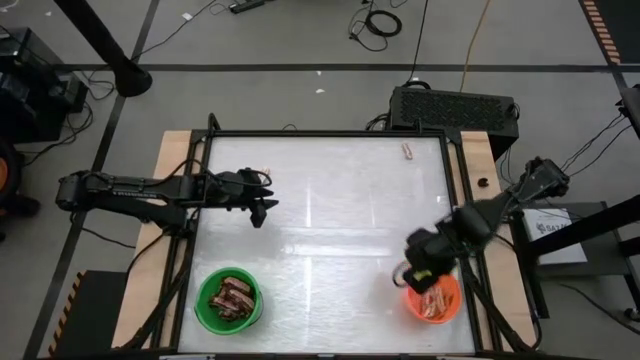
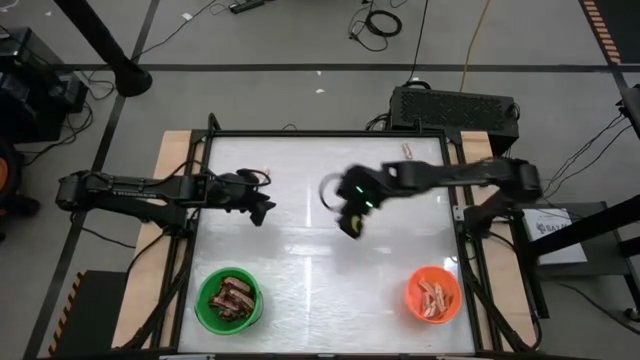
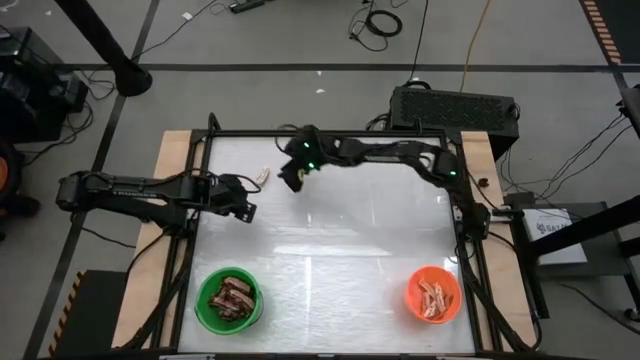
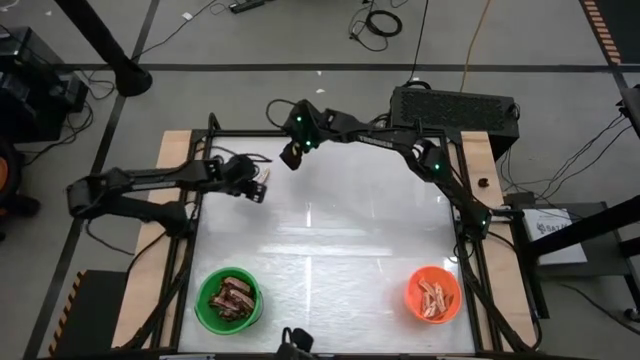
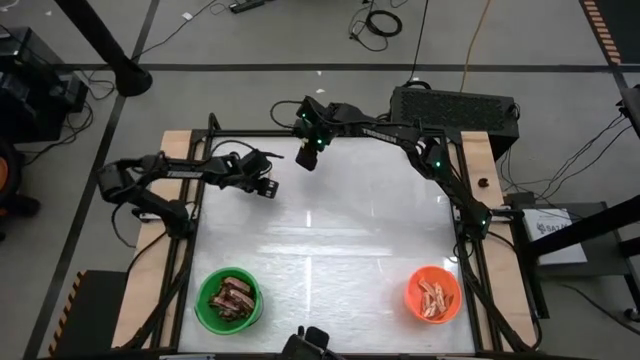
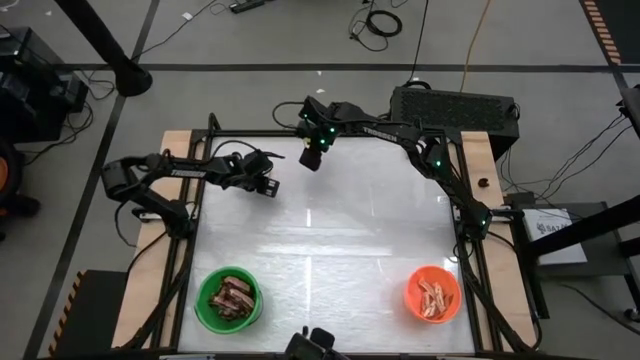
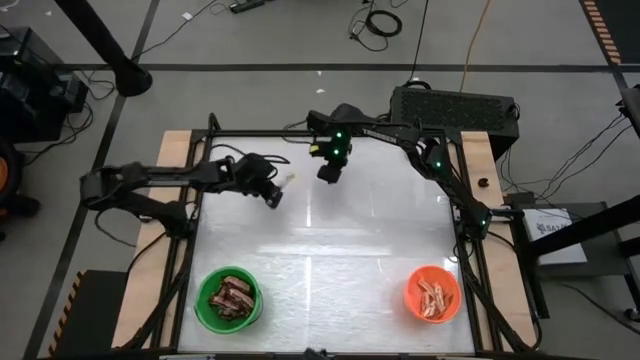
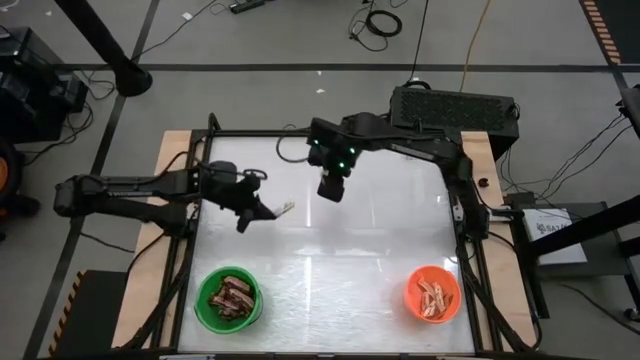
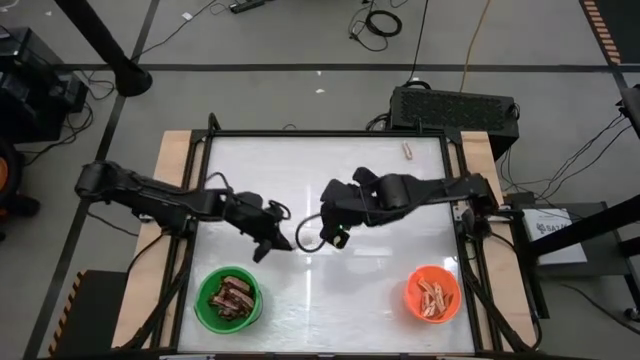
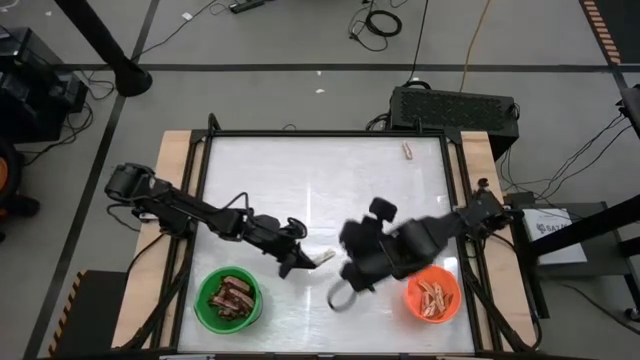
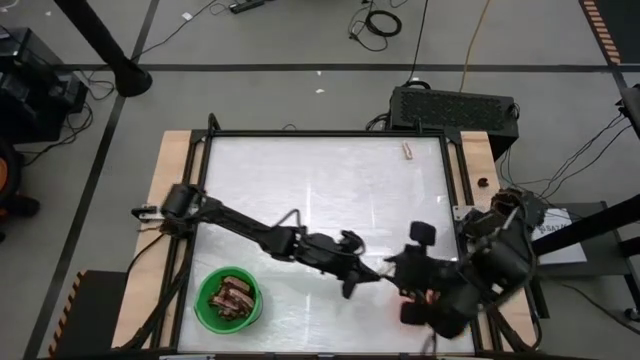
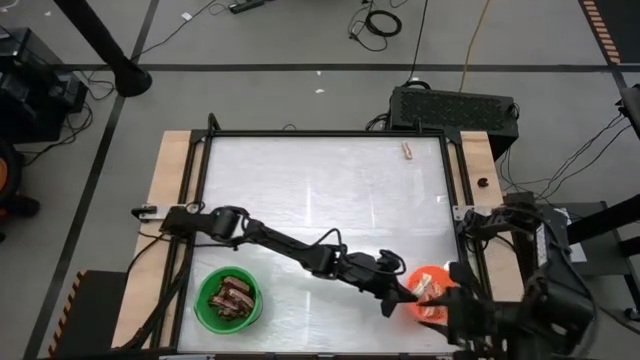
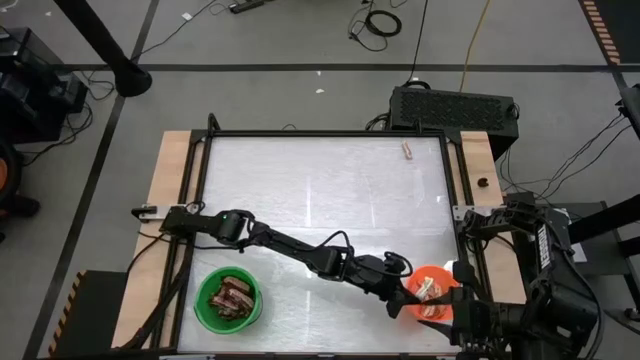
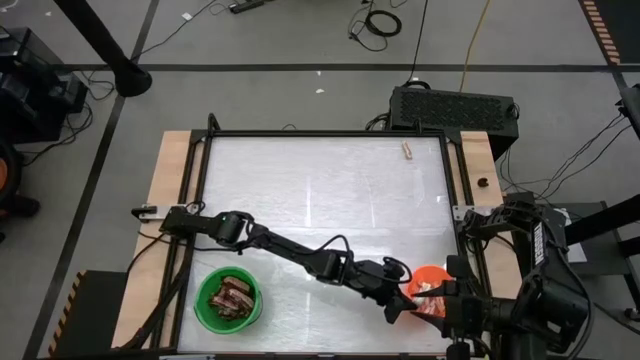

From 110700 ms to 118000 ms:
Task: Sort candy by brand, put in halloween buckets
Put the white candy into the orange bucket

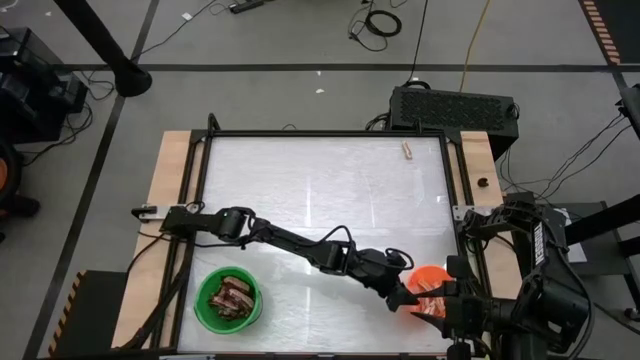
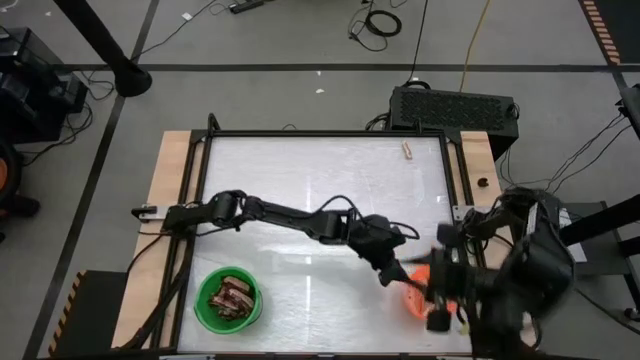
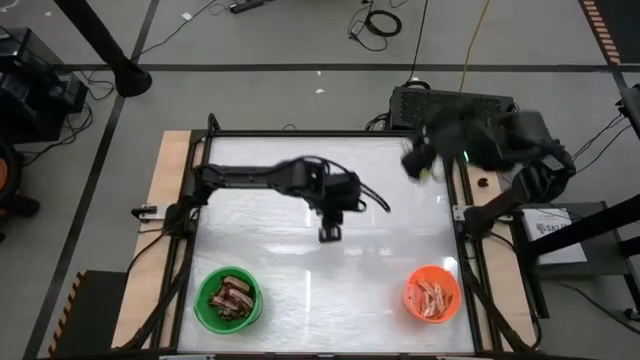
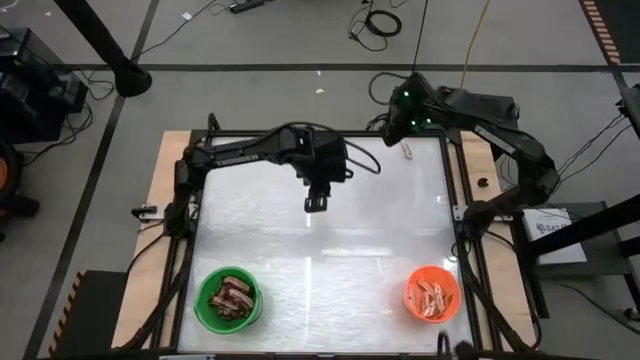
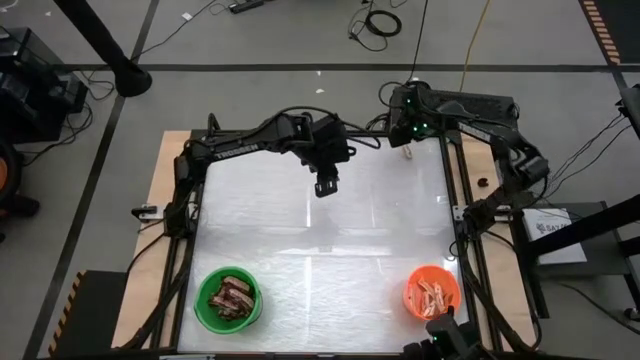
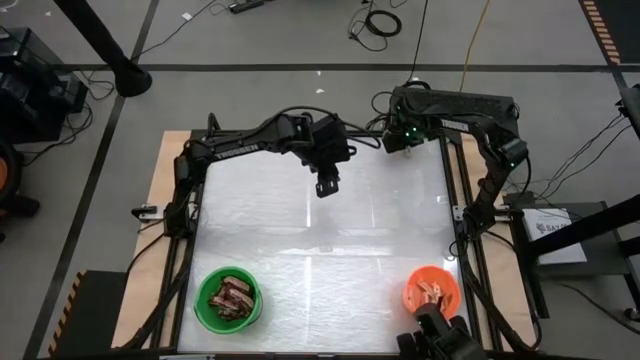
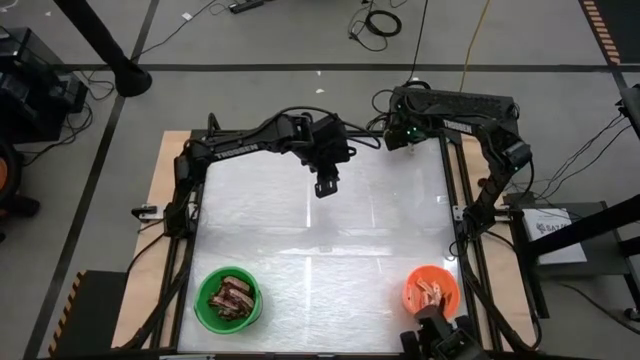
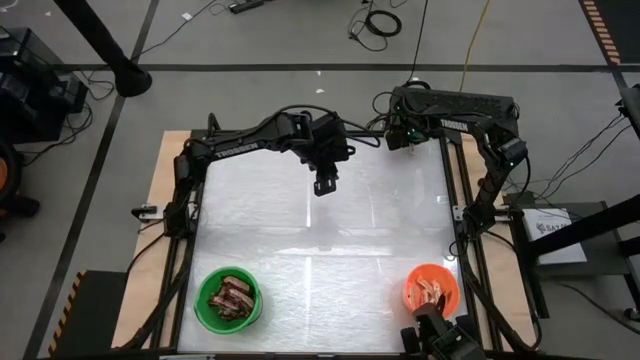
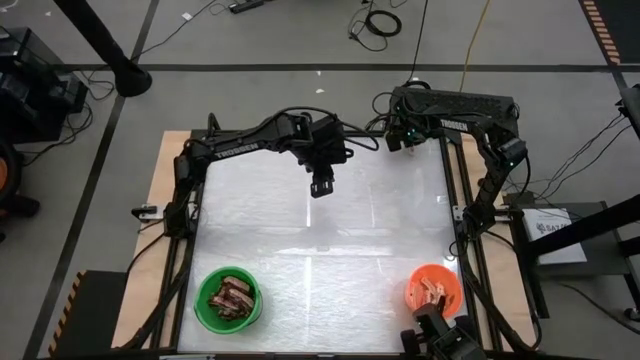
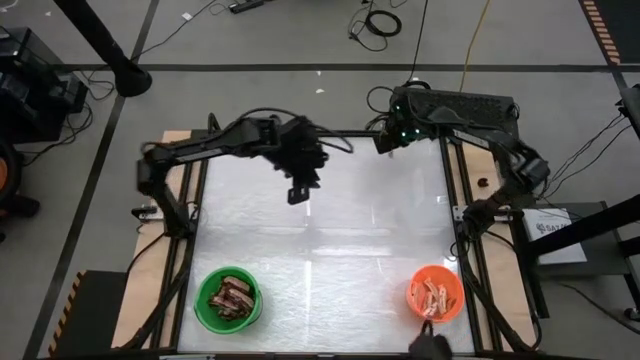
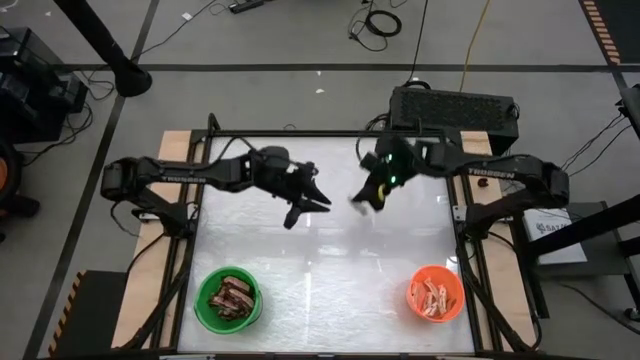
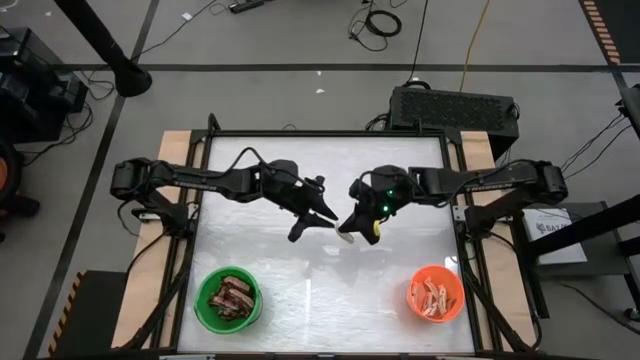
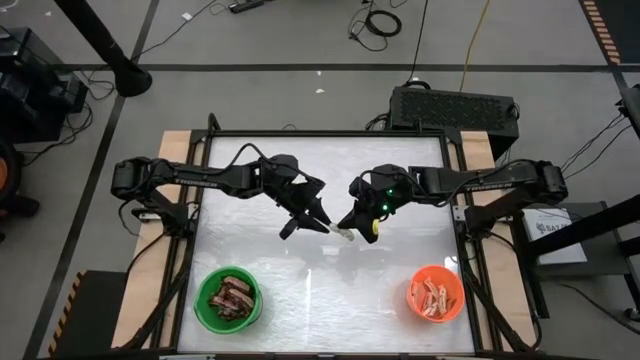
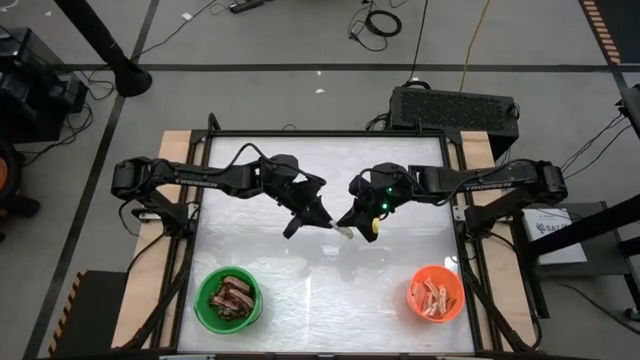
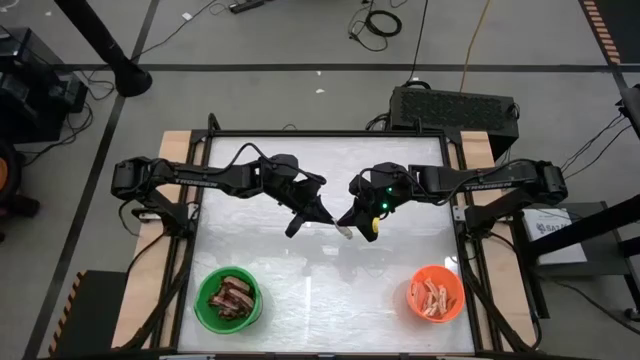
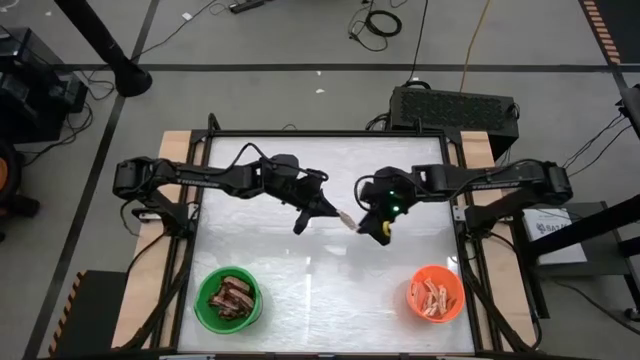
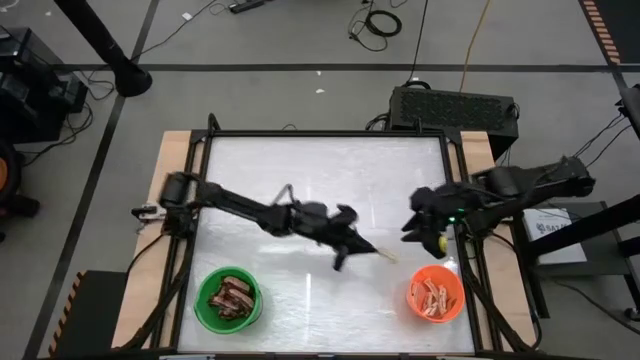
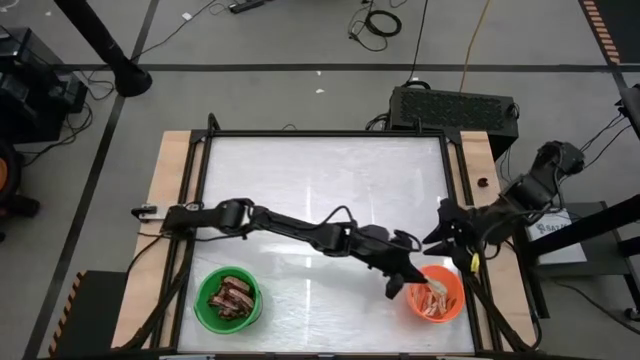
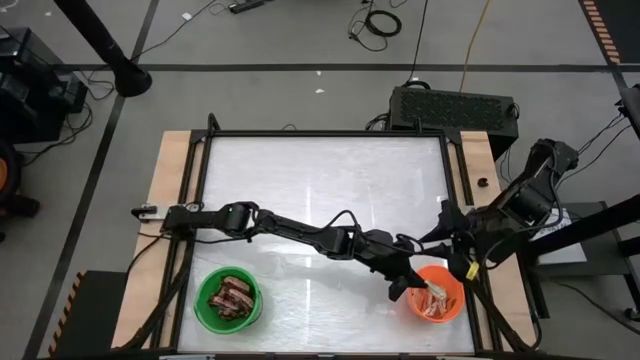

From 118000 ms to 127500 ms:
Put the white candy into the orange bucket

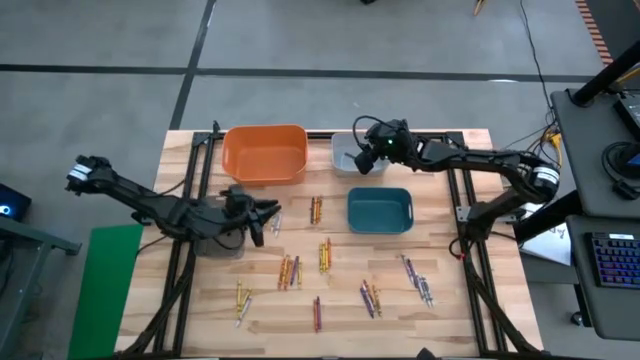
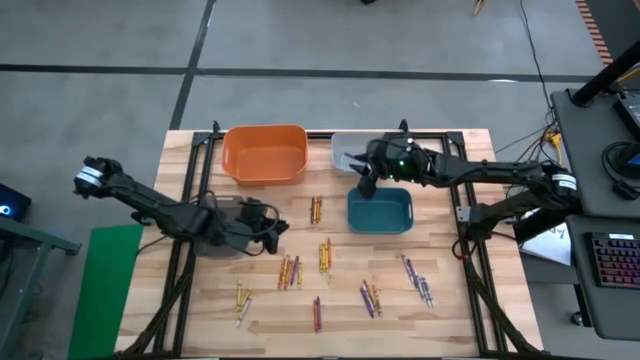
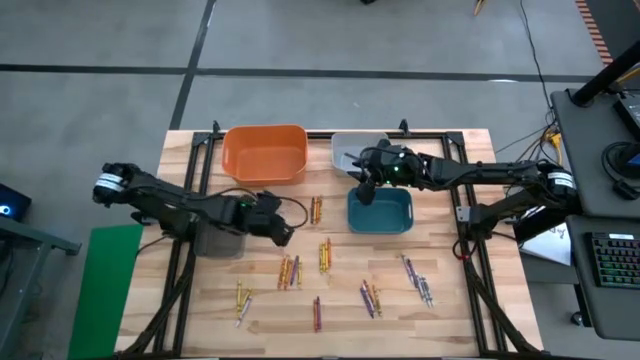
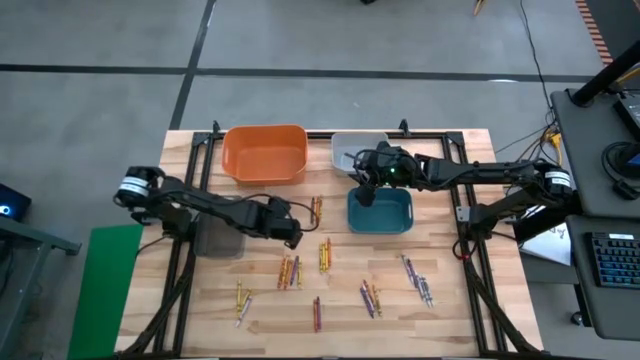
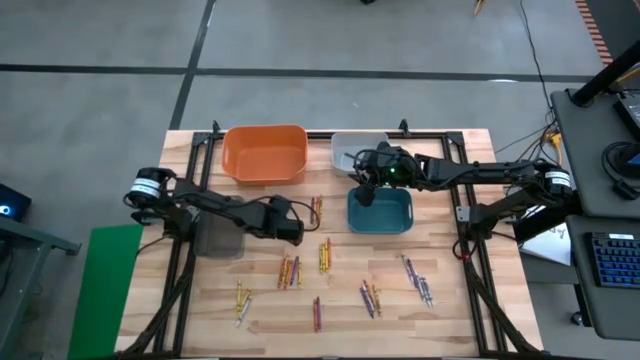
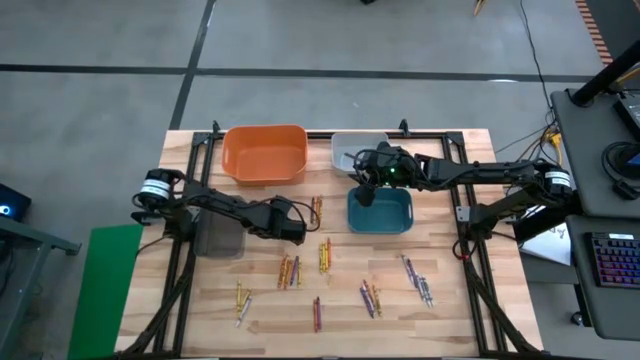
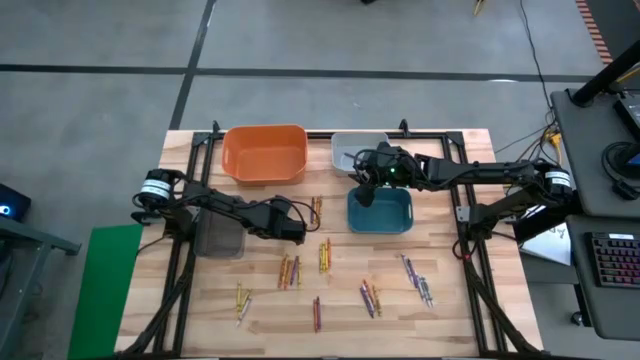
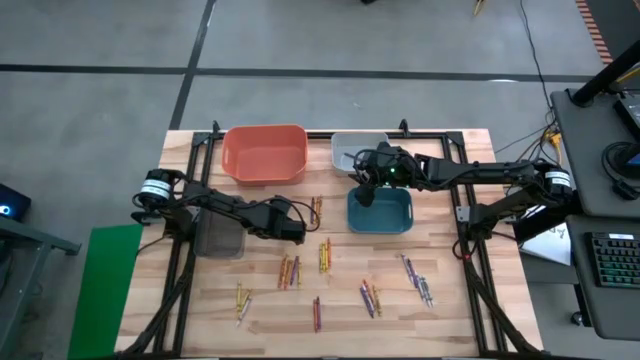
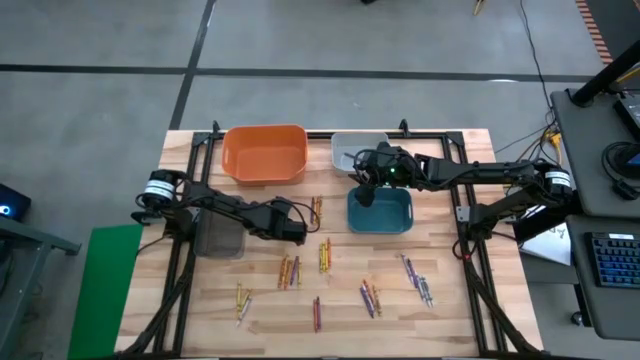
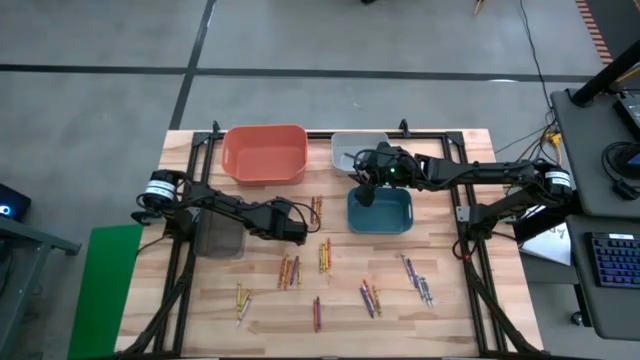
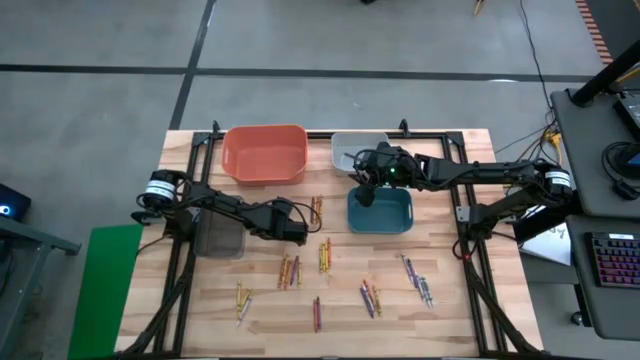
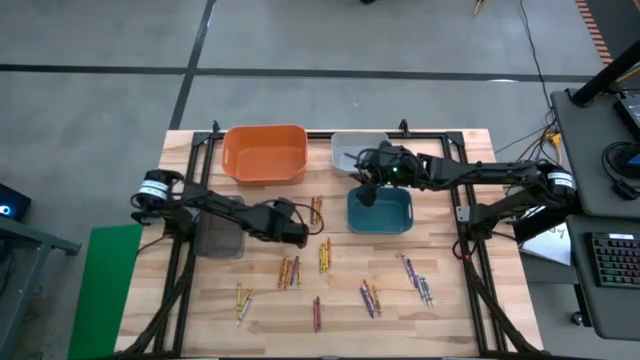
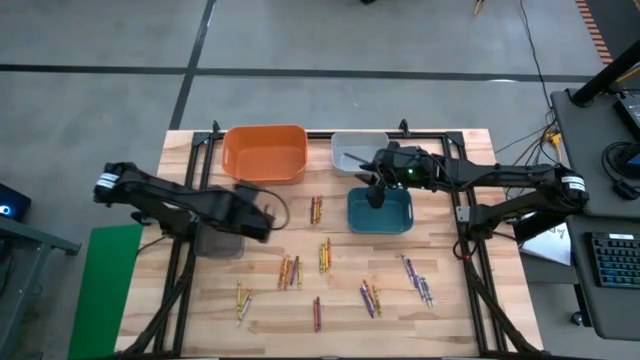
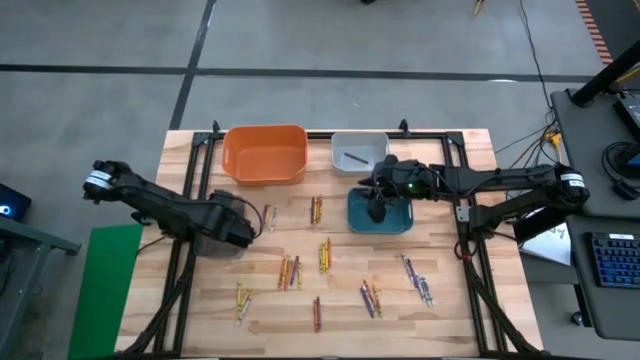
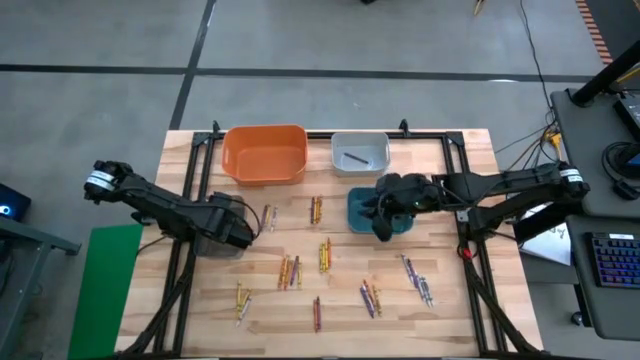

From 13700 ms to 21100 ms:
Task: Sort crayons
Put the white crayon into the black bin
